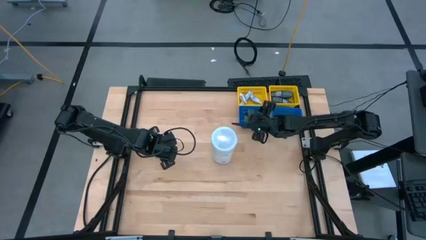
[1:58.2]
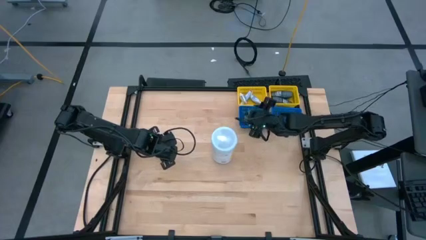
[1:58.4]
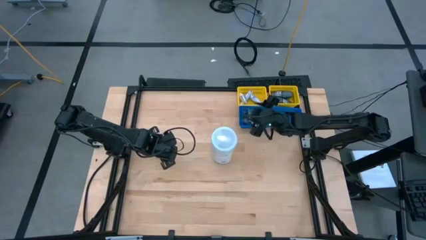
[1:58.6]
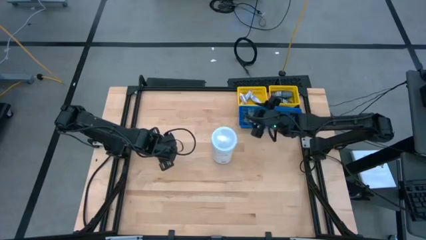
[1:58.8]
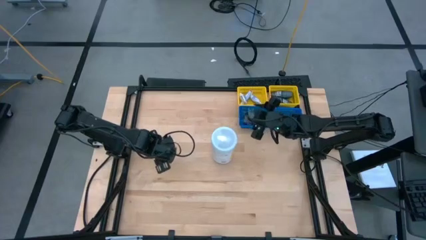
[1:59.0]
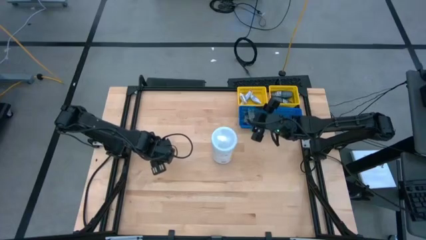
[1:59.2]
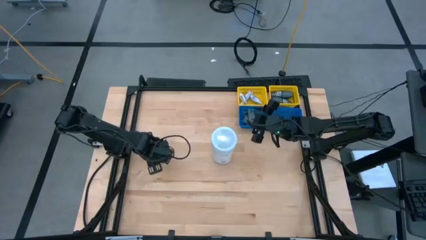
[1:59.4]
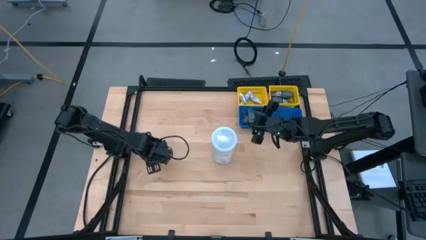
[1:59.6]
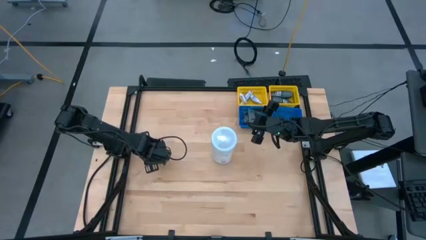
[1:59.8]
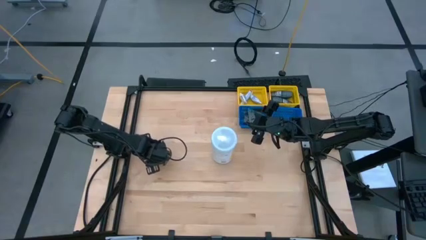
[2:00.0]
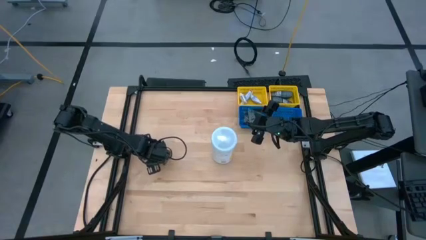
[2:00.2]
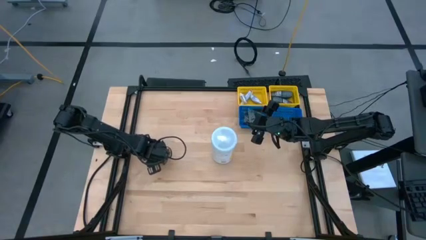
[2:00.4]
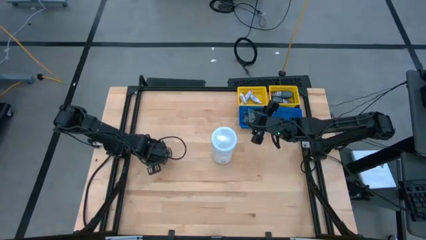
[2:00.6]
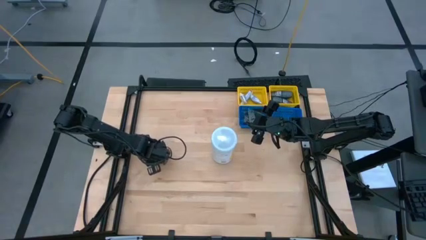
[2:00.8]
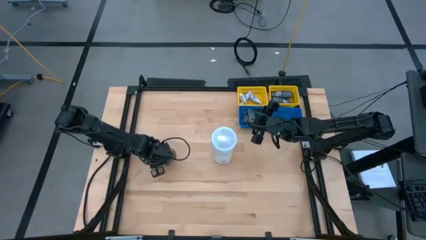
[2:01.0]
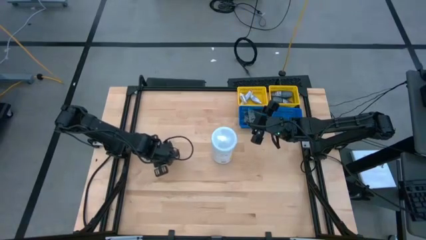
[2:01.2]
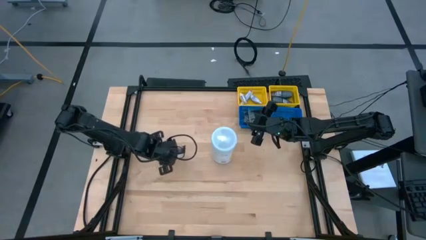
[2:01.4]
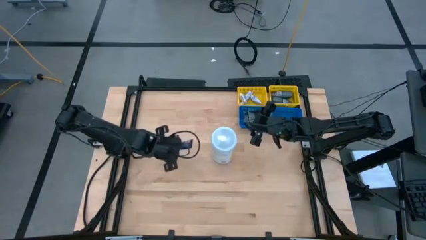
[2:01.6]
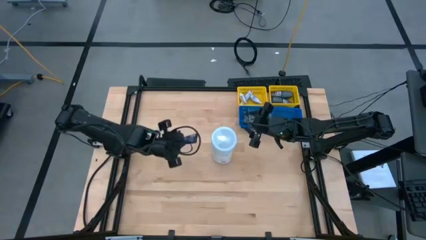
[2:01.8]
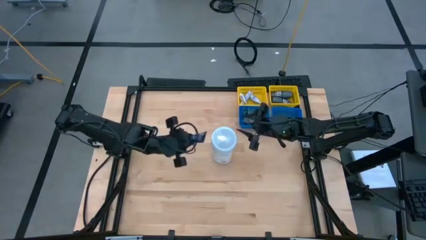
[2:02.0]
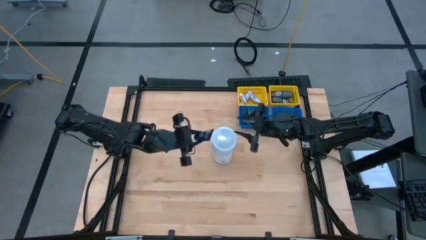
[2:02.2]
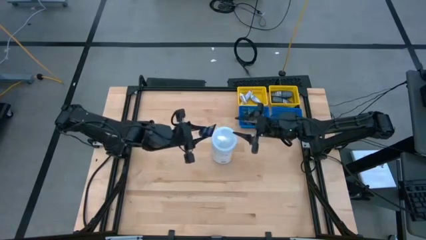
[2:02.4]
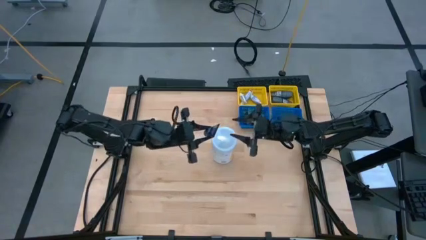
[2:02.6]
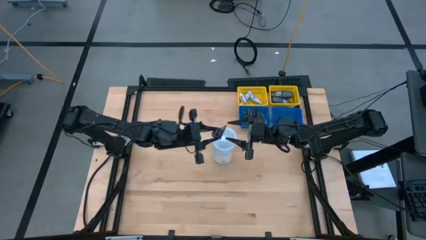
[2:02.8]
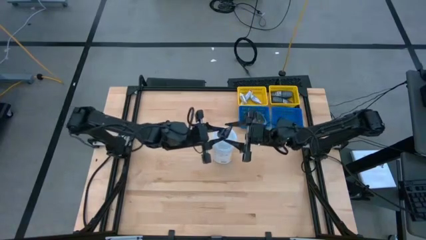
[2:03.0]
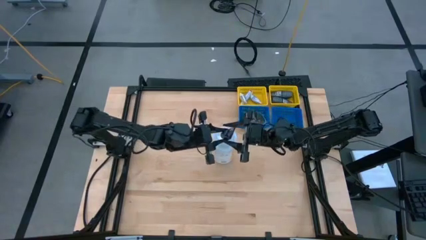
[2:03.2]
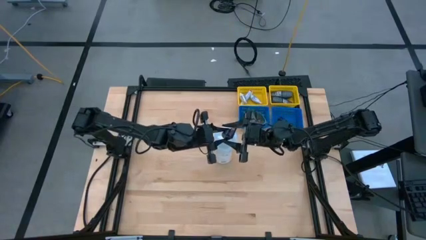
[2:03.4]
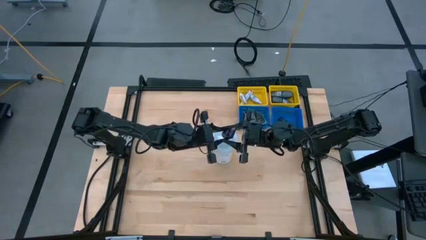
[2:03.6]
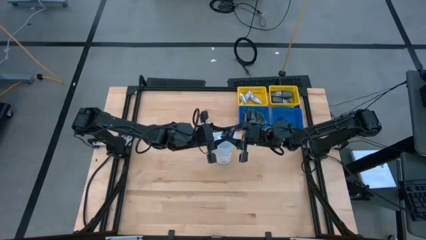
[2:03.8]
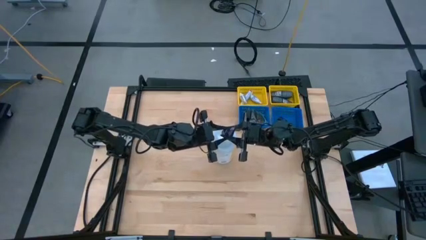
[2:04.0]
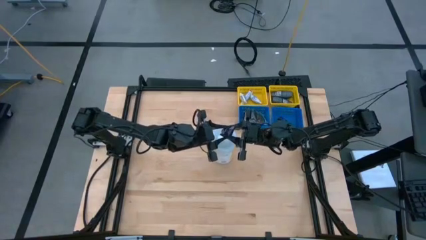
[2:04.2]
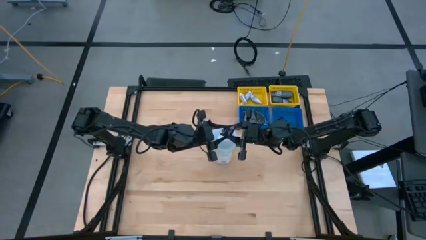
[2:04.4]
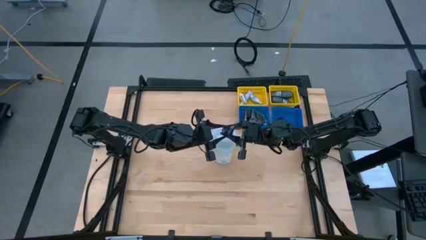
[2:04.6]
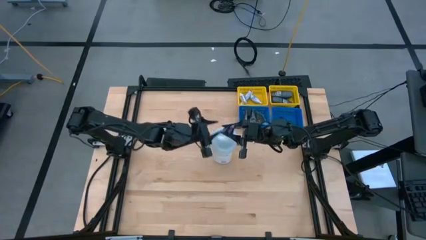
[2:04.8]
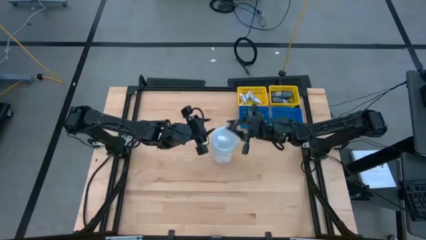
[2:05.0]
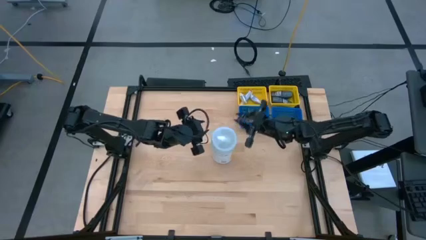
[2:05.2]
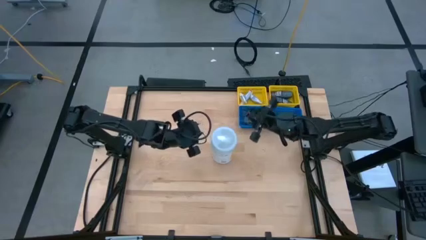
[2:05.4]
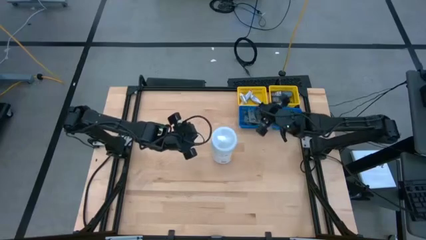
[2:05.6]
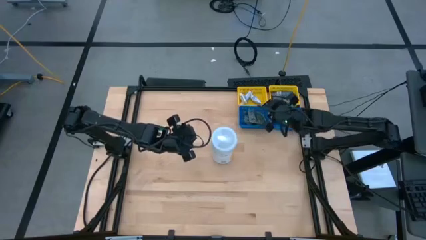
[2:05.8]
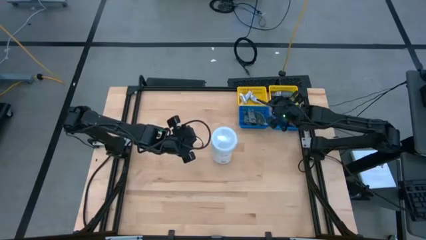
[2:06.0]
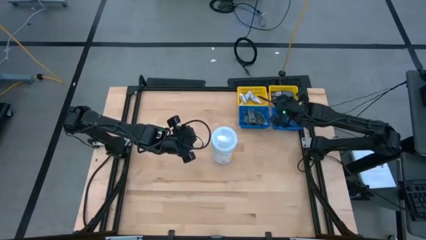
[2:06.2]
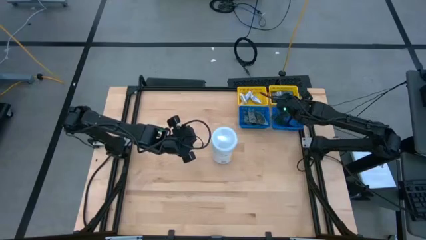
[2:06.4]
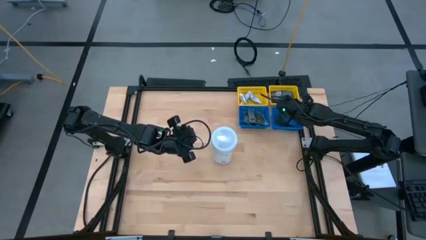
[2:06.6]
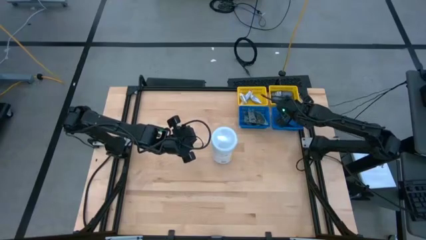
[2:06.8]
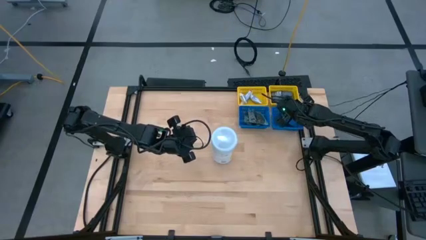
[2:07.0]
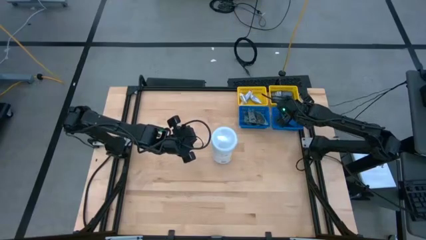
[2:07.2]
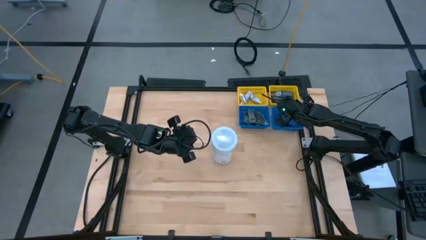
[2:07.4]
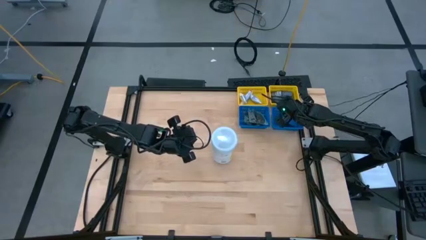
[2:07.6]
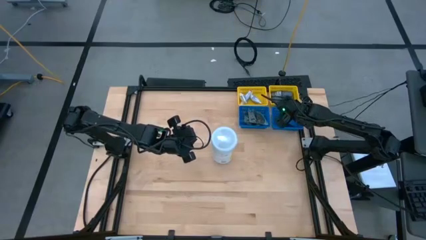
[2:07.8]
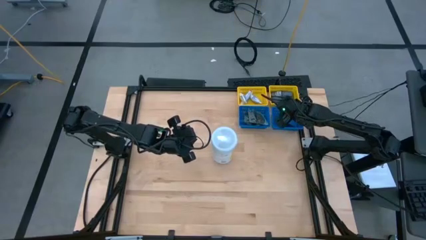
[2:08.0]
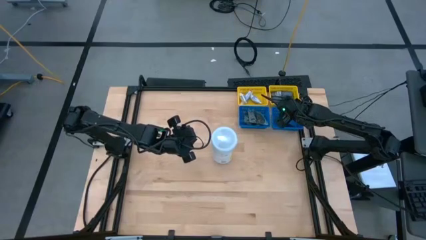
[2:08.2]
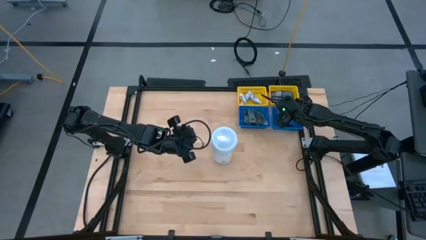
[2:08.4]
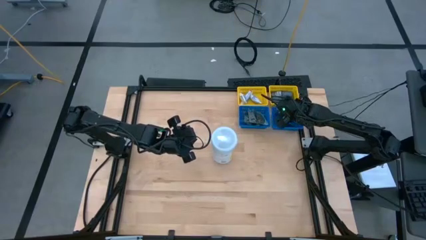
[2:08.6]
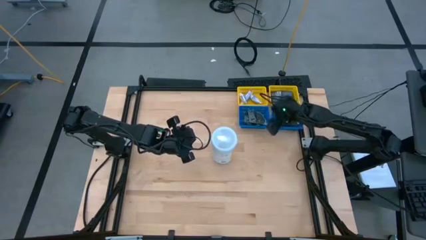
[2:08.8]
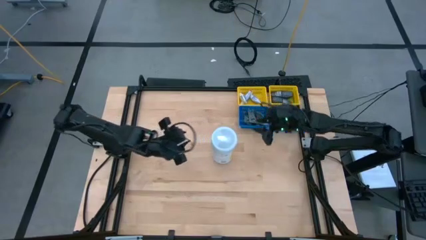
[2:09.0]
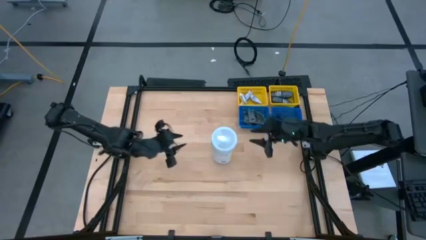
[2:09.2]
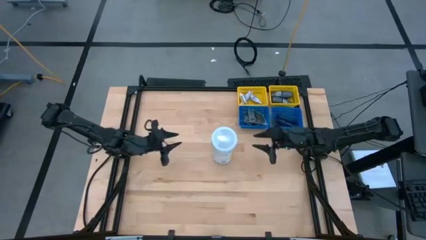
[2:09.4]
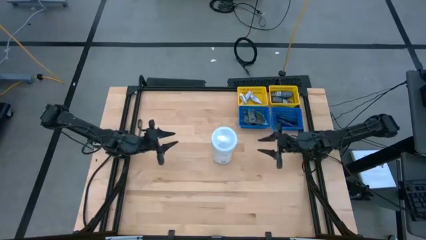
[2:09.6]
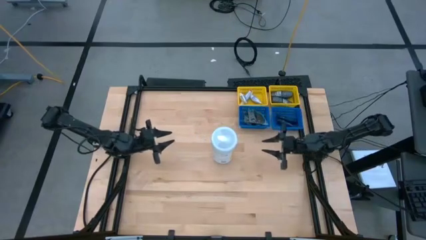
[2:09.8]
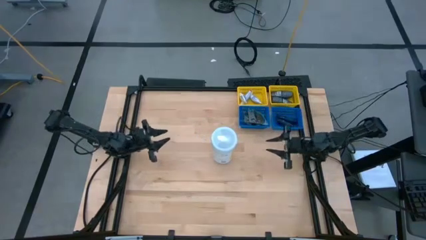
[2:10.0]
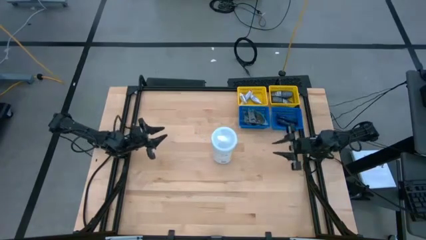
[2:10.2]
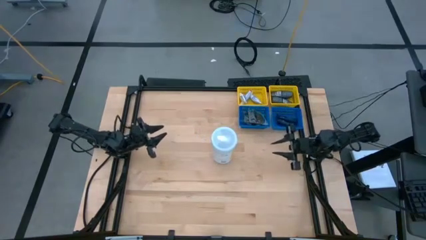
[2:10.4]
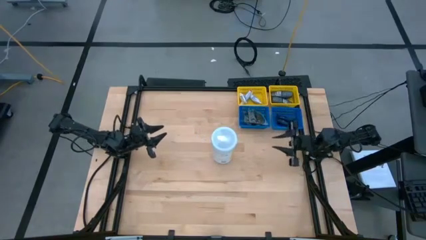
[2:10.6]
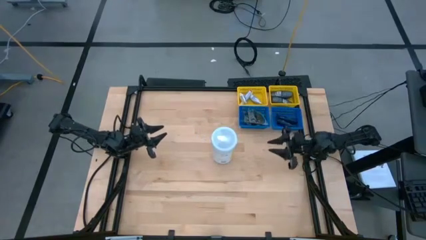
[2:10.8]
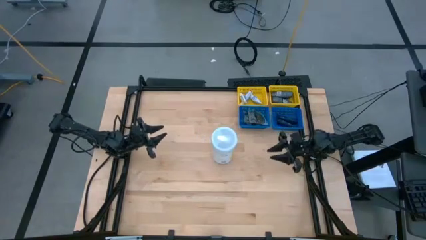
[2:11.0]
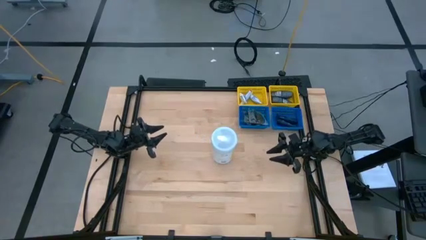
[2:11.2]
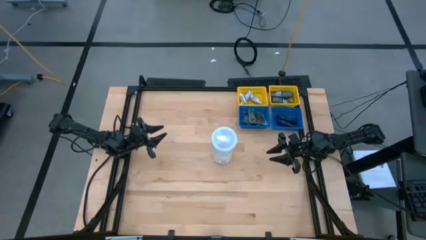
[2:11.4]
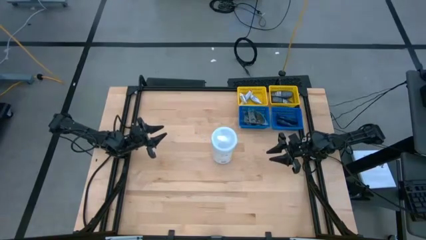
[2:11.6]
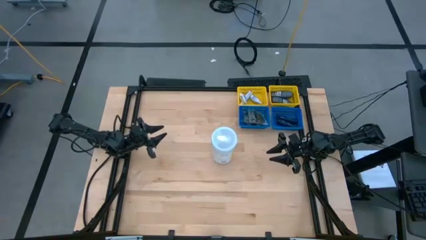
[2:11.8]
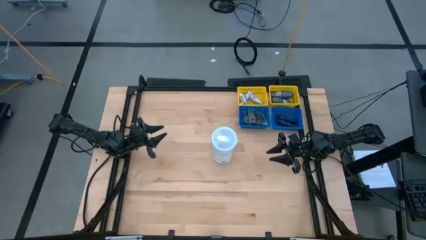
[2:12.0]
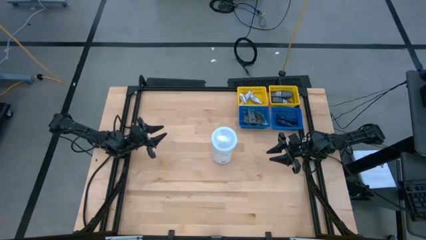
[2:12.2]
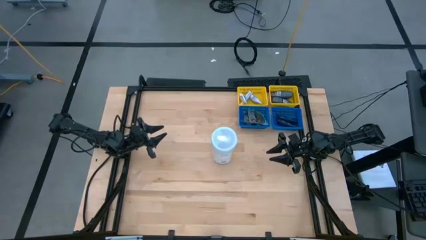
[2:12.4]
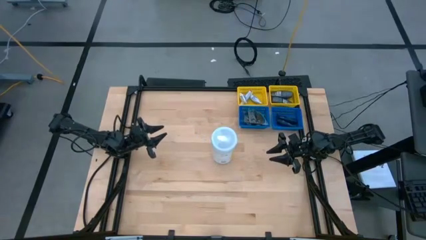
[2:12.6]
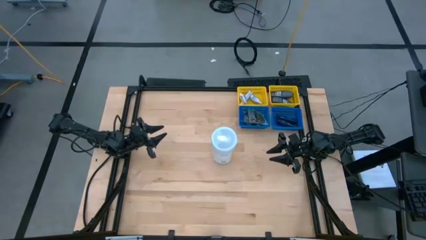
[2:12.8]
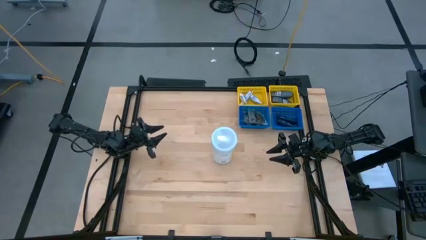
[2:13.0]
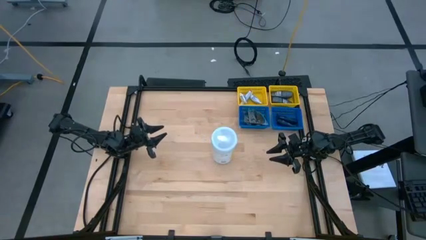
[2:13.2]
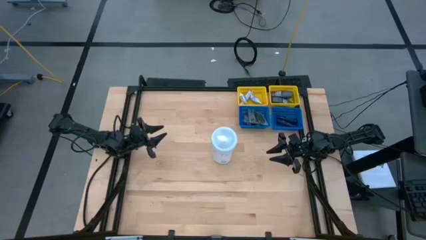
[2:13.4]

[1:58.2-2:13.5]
Task: Pick & Place Travel size toiletries
Return to Home Position

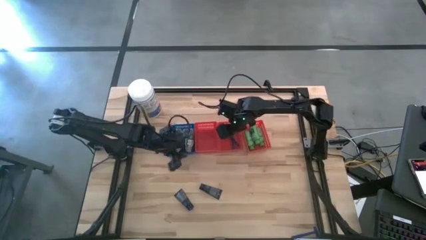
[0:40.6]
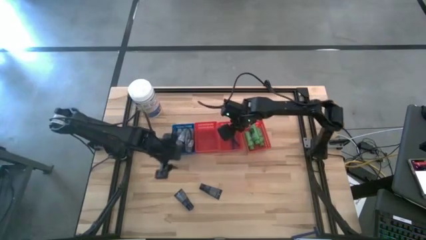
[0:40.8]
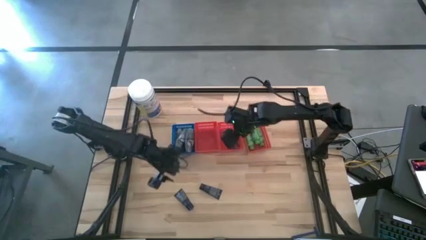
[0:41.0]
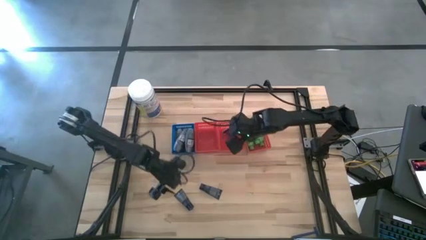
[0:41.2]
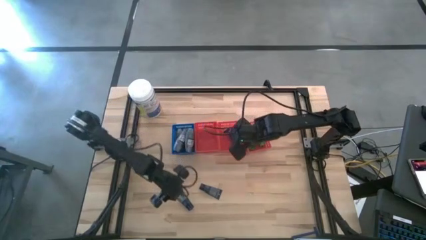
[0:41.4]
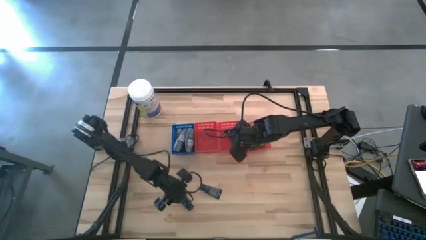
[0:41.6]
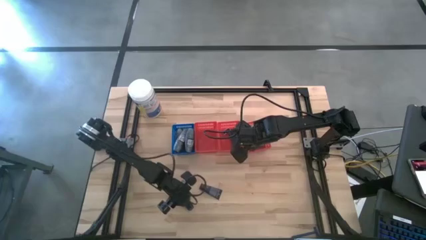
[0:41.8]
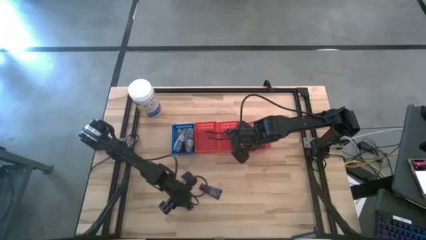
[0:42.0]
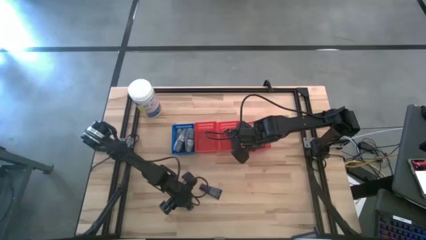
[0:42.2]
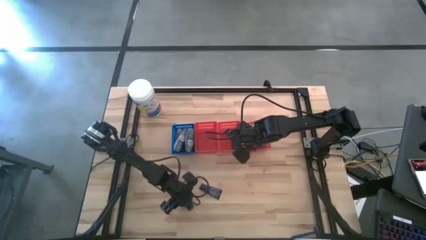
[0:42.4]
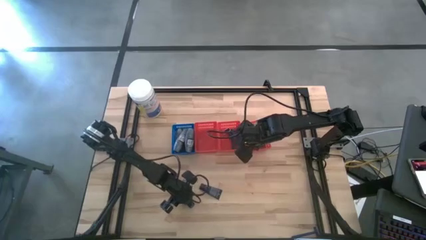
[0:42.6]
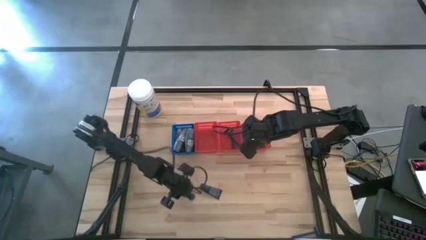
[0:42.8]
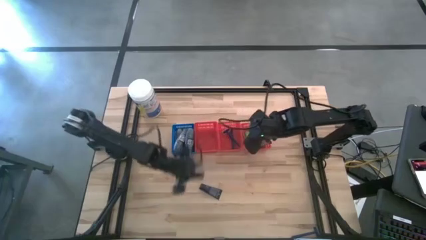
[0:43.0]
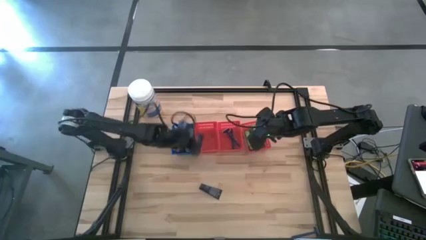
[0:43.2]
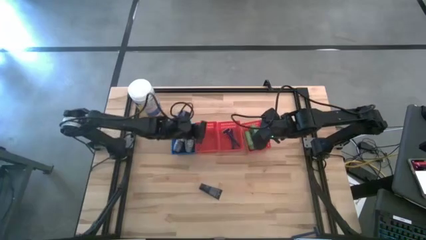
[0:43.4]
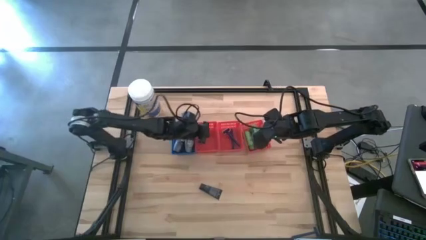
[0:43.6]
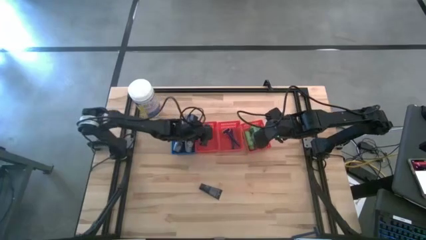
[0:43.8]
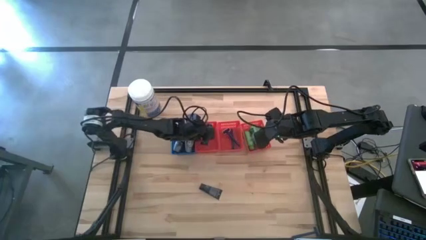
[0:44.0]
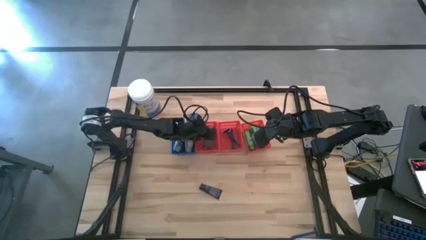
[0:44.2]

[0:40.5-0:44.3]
Task: Pick & Place Travel size toiletries
Put the shave cream into the left red bin
